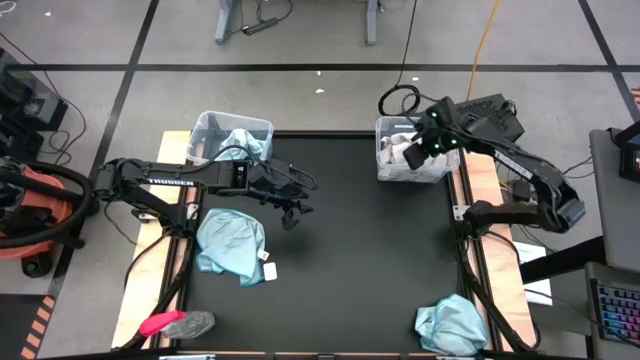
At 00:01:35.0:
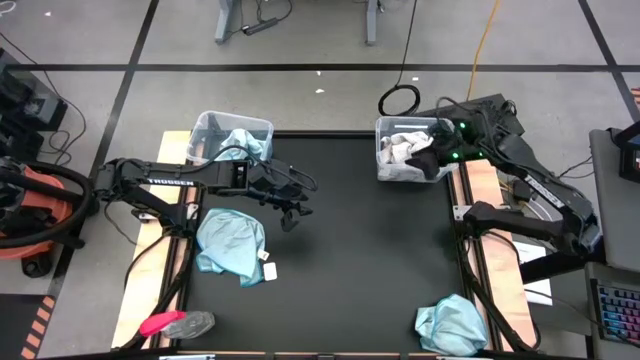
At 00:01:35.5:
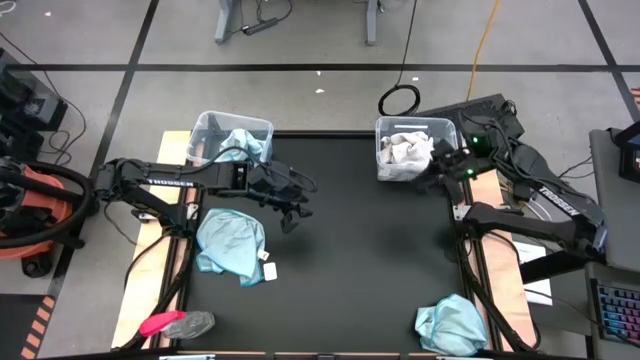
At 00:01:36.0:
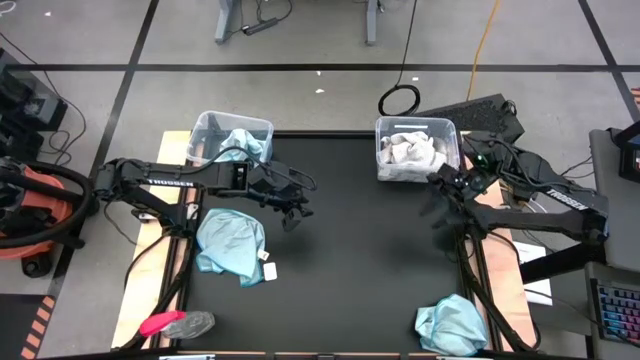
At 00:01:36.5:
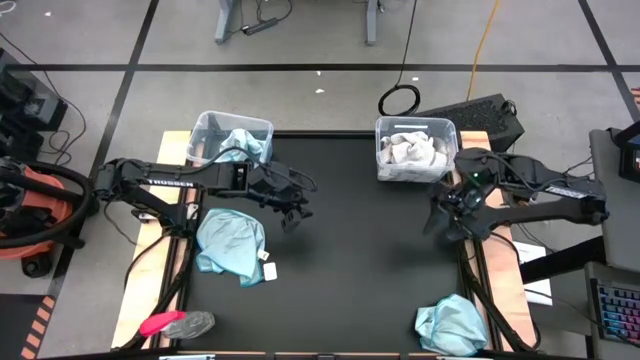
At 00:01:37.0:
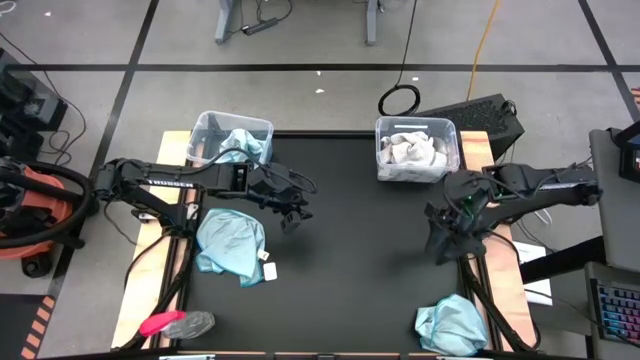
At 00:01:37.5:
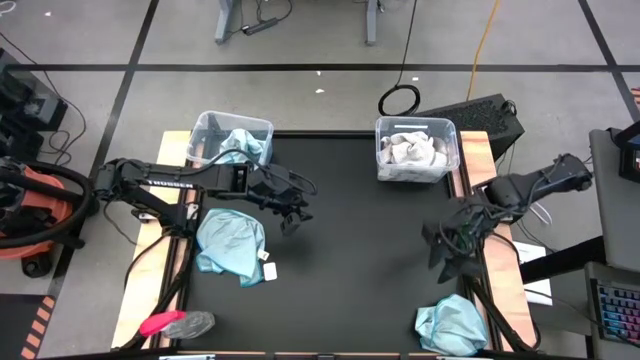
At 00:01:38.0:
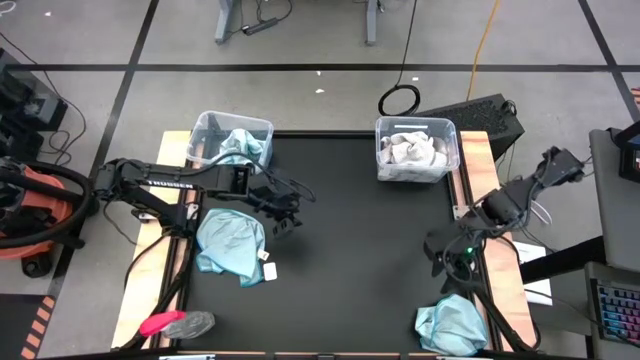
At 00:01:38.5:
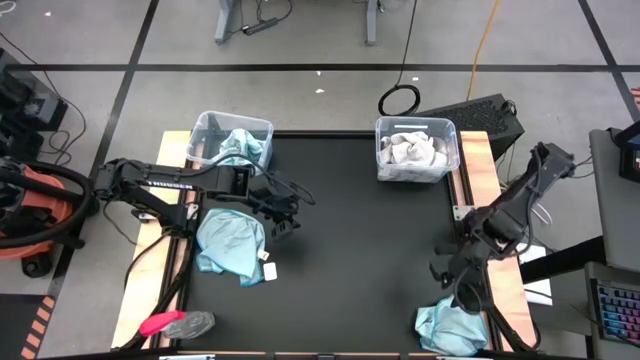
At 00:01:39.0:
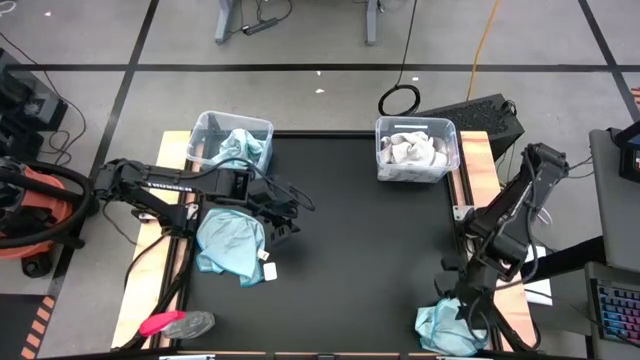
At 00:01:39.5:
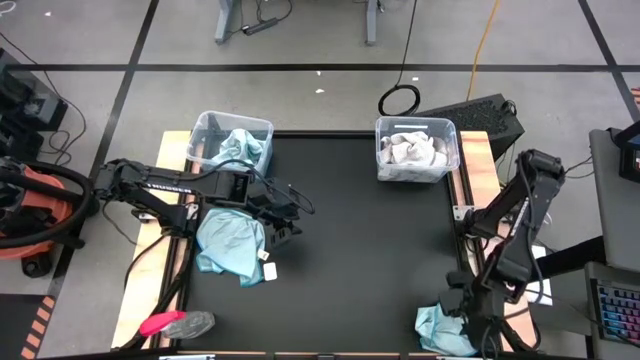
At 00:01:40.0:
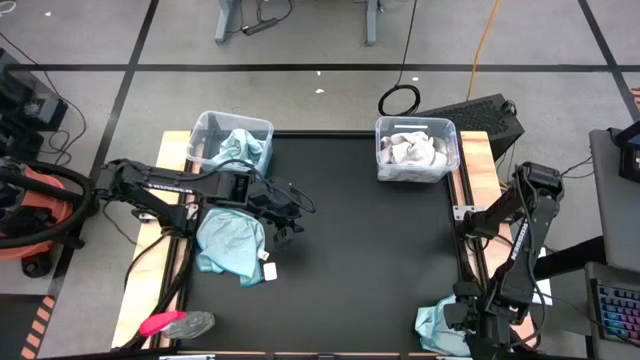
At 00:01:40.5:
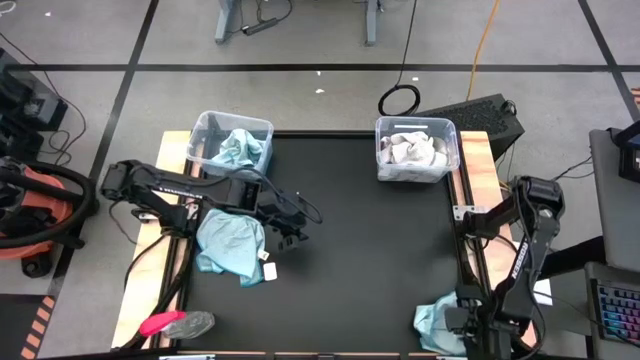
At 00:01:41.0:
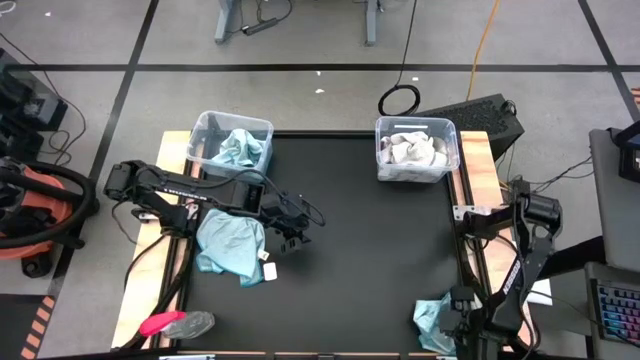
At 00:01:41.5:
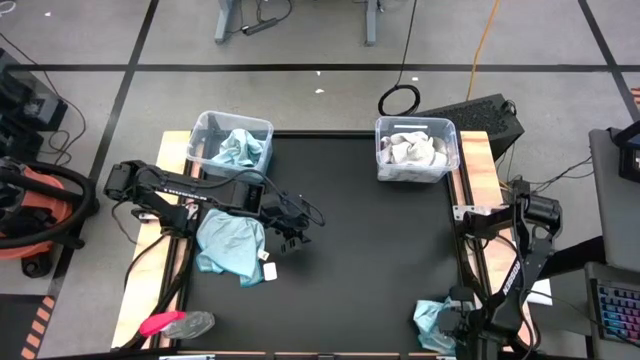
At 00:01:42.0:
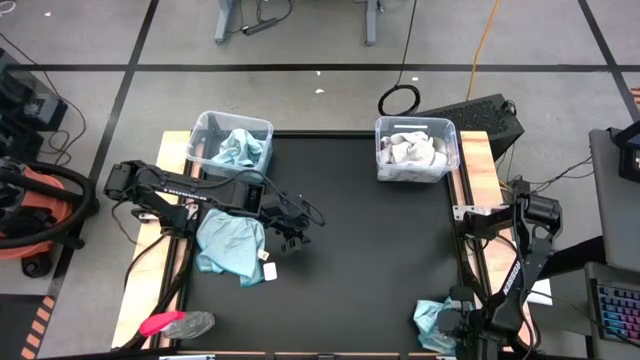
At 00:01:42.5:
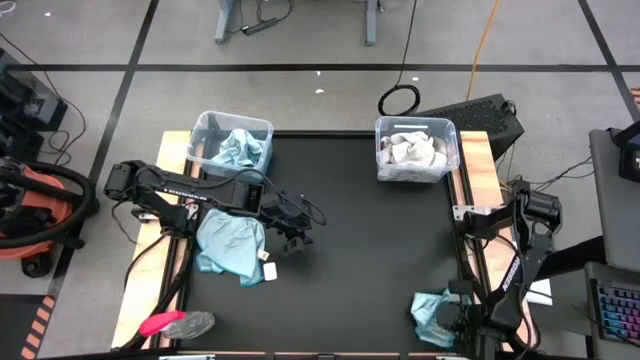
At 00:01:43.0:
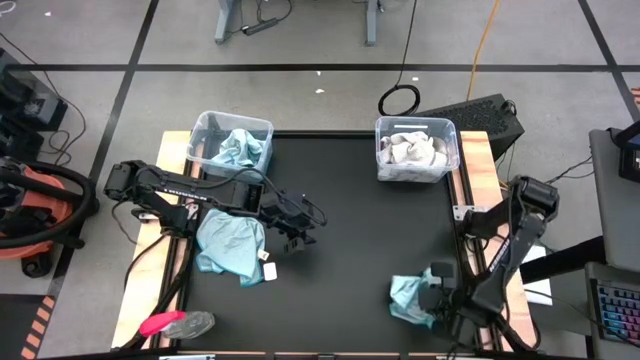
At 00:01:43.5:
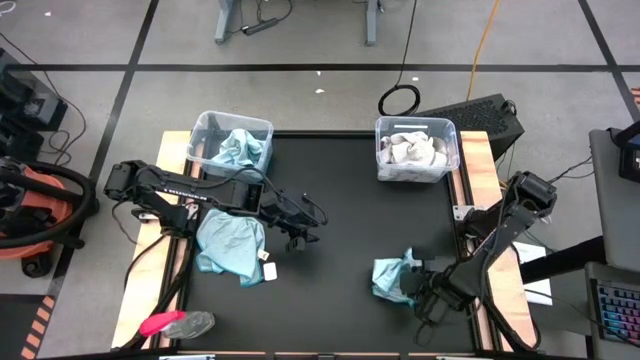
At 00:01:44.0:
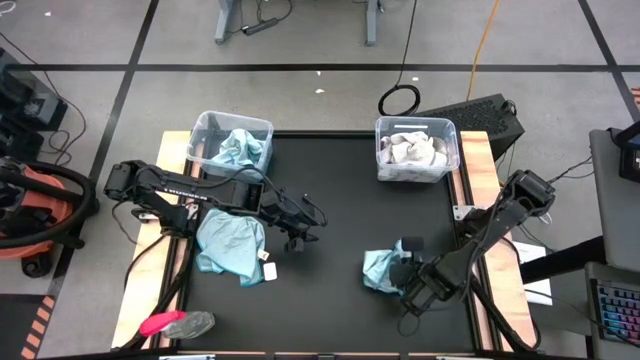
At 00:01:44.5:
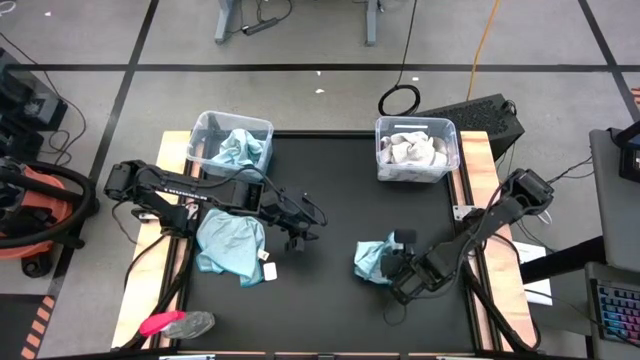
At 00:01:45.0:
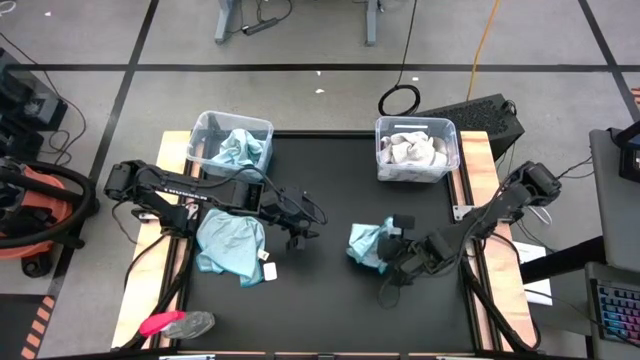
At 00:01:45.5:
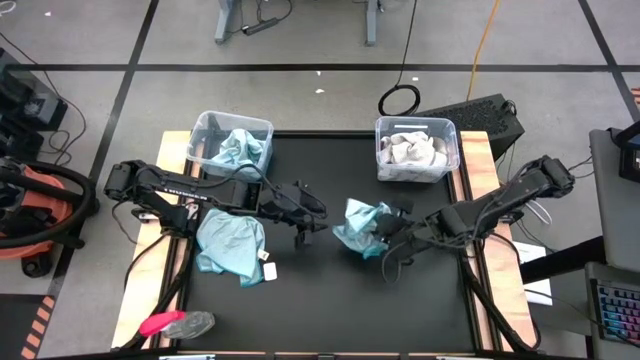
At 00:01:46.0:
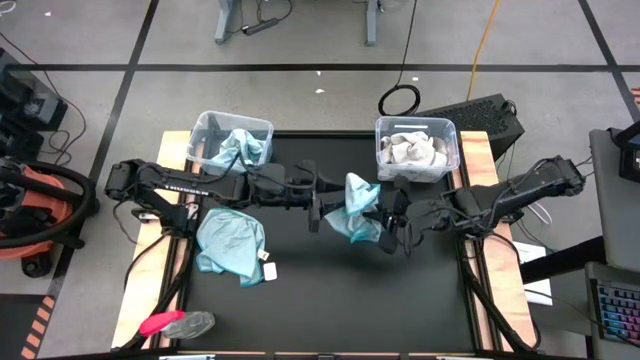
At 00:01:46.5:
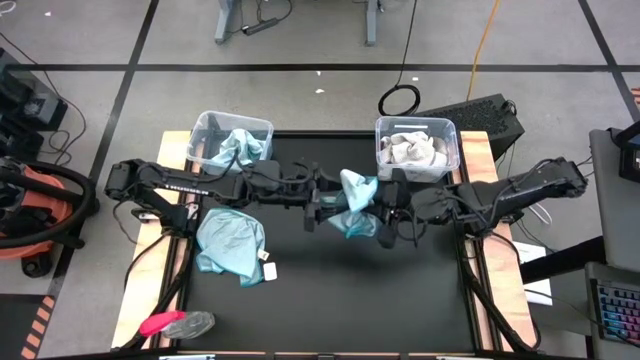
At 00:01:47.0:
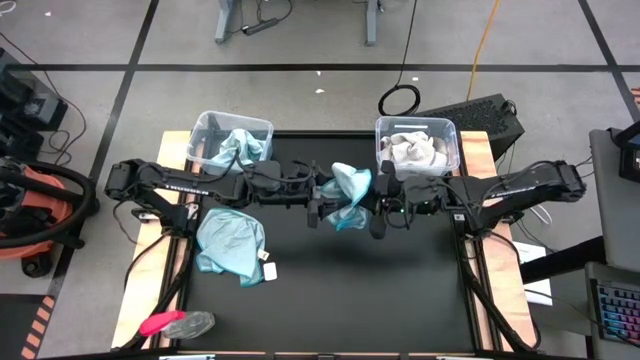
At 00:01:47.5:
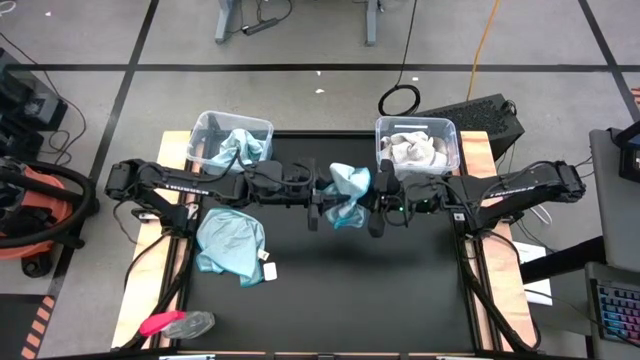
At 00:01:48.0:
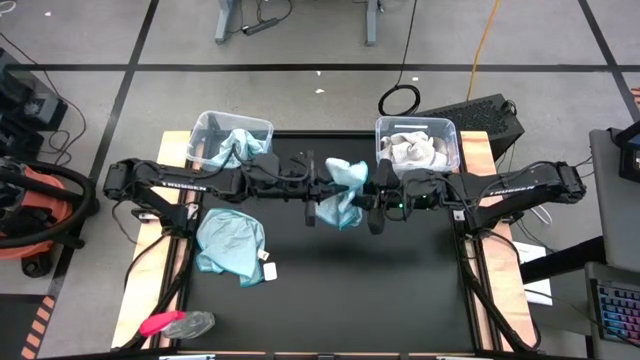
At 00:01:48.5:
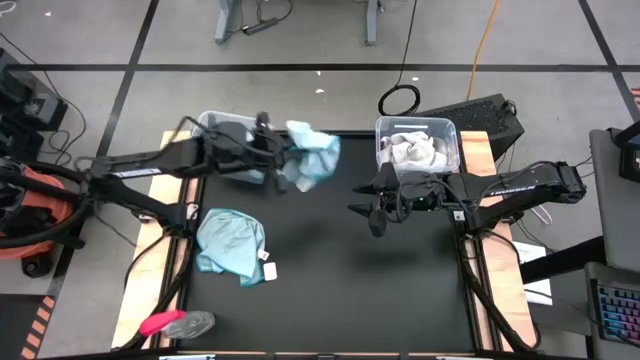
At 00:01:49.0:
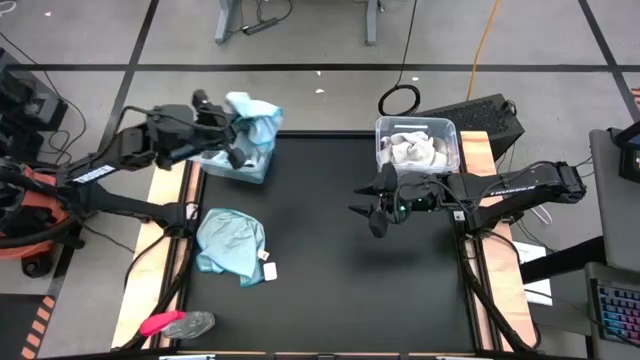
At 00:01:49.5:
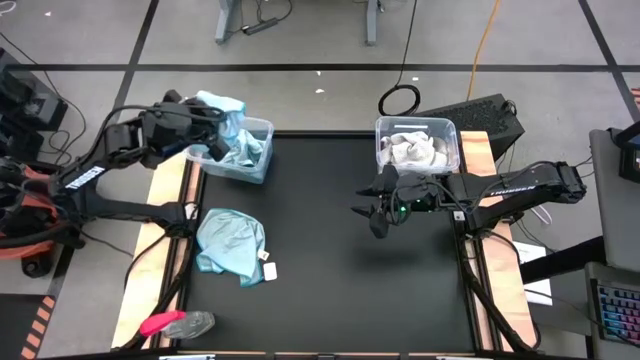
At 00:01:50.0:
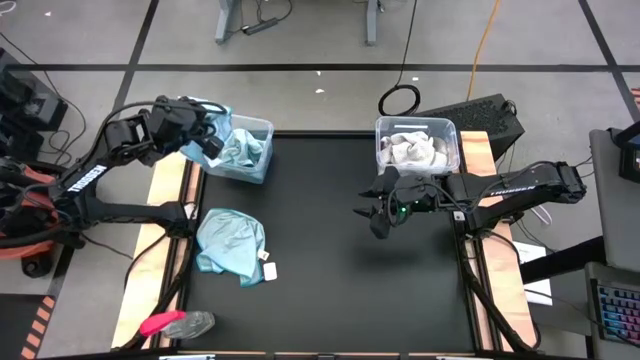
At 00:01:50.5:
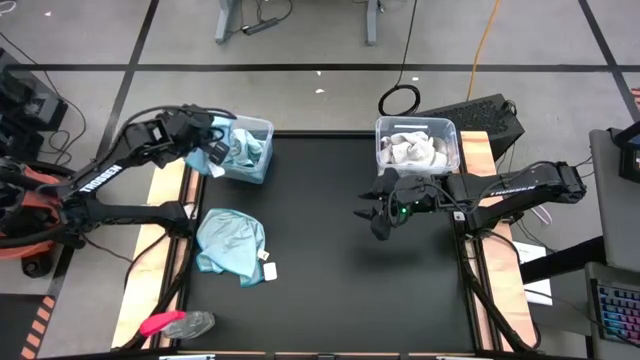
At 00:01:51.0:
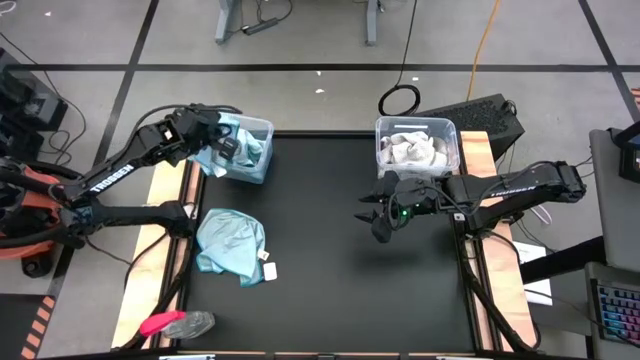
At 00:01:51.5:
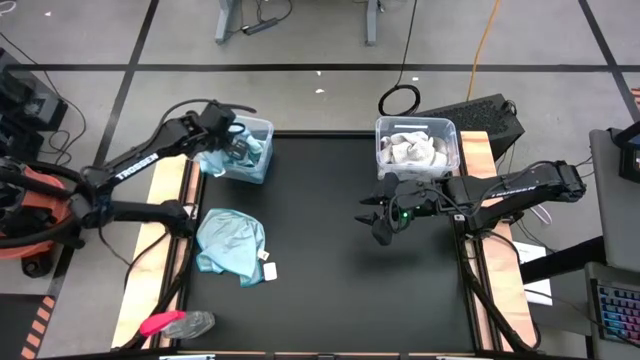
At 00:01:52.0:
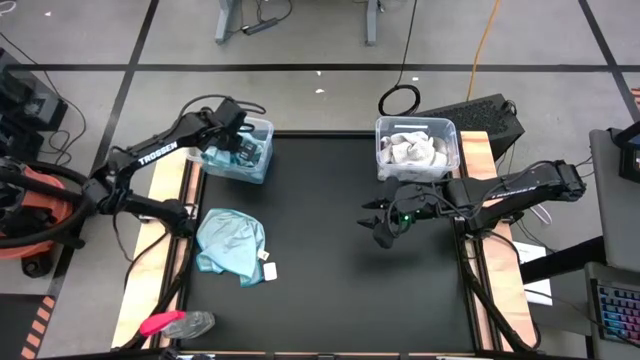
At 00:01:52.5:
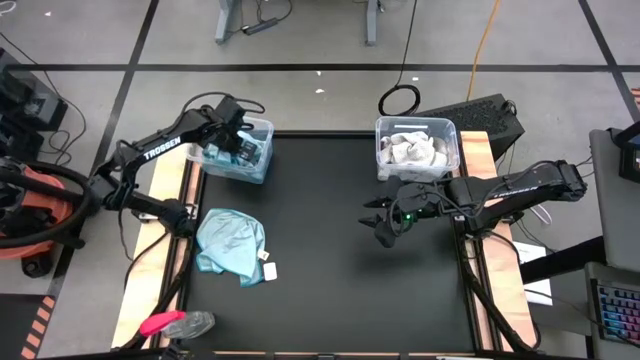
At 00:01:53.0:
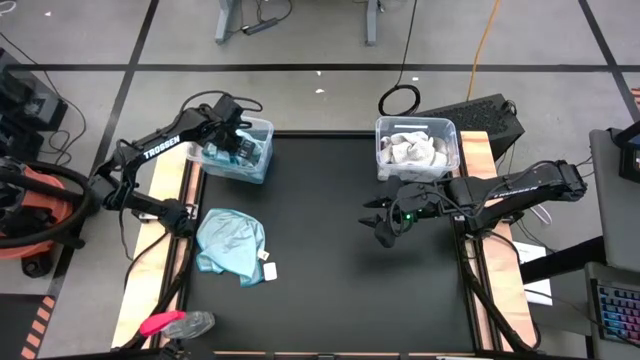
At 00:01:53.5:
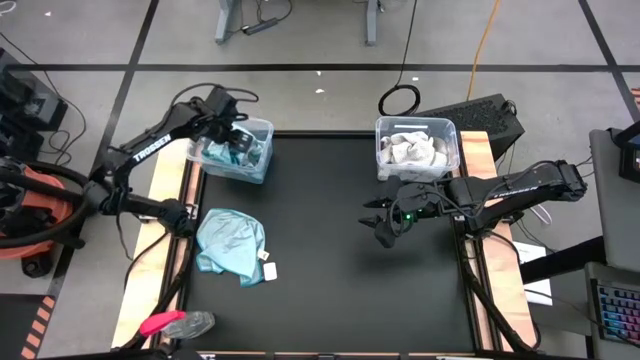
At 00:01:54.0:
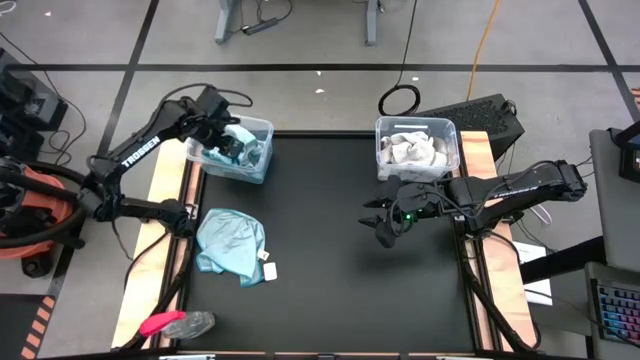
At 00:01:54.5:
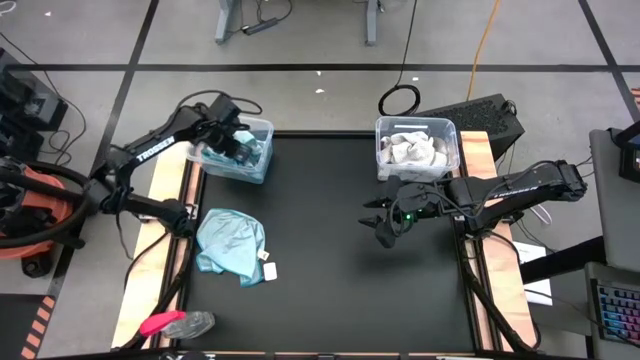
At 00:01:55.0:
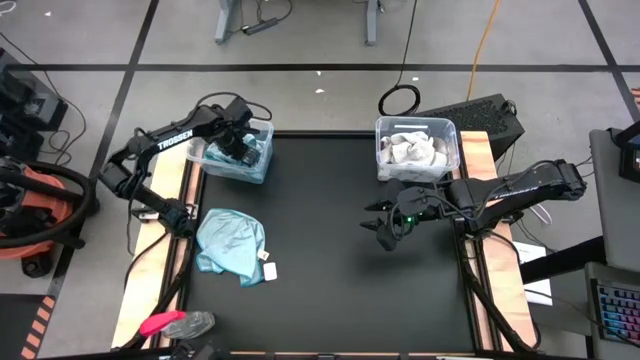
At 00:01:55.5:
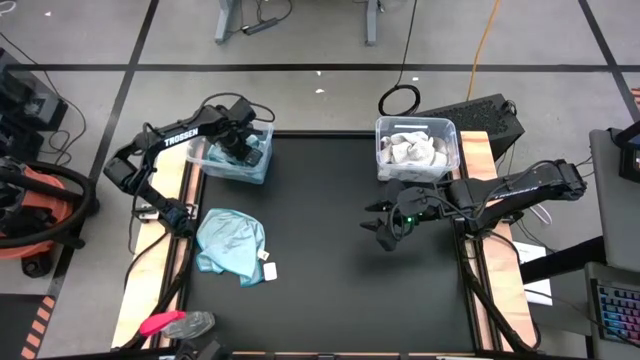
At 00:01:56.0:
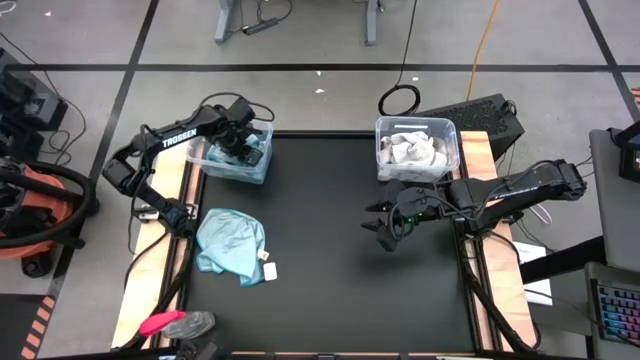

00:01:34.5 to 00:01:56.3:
Task: Sort microfiber towel by color & place in baskets
Put the blue microfiber towel into the left transparent bin
